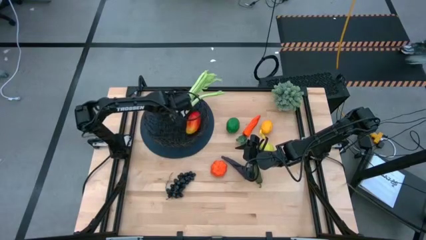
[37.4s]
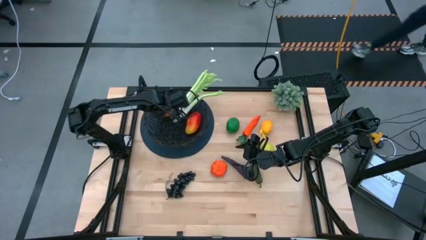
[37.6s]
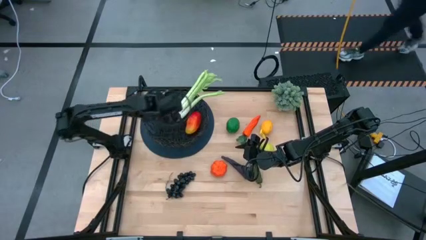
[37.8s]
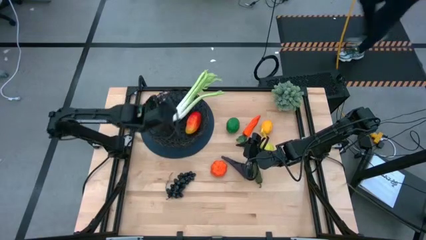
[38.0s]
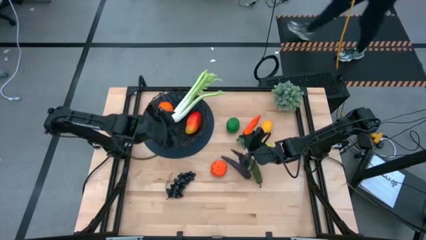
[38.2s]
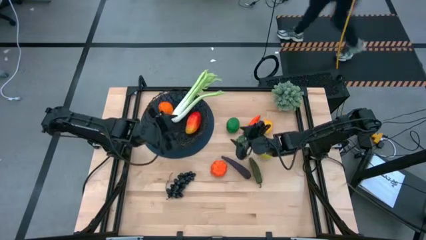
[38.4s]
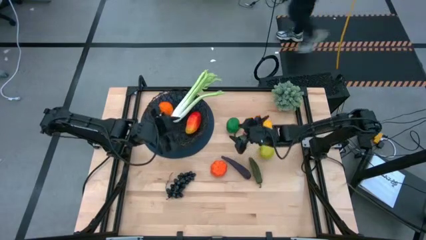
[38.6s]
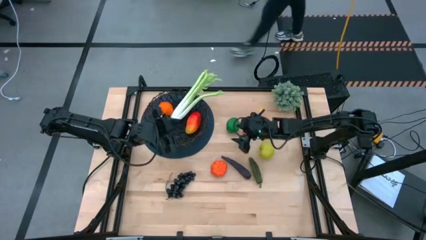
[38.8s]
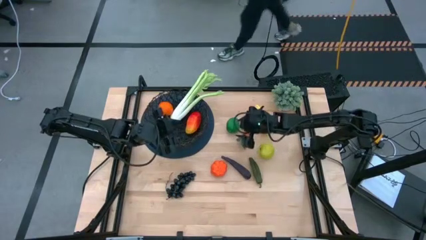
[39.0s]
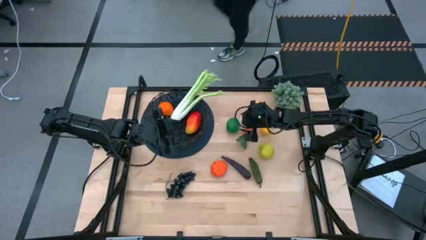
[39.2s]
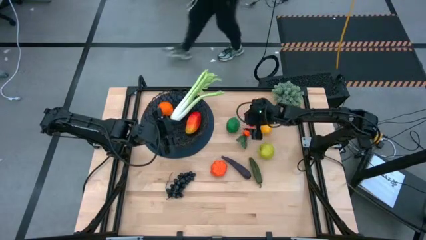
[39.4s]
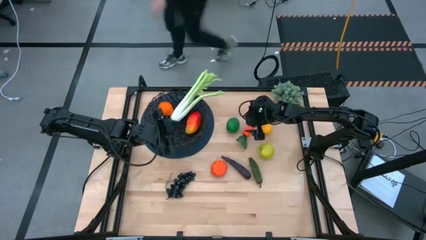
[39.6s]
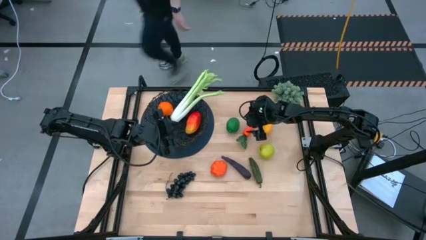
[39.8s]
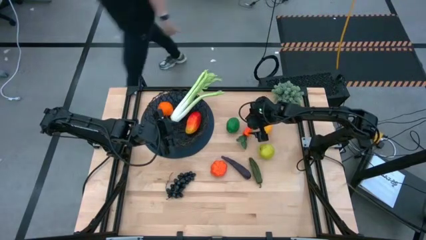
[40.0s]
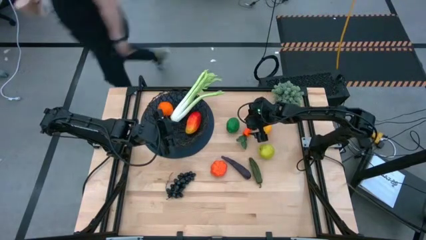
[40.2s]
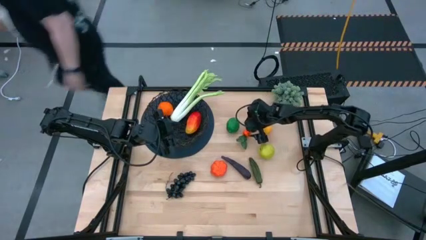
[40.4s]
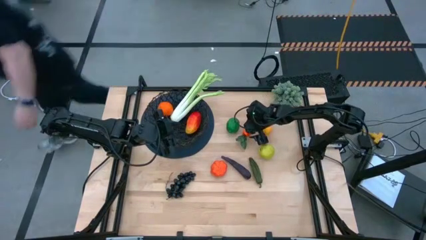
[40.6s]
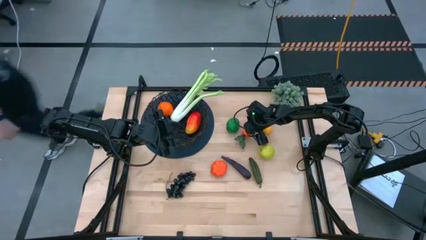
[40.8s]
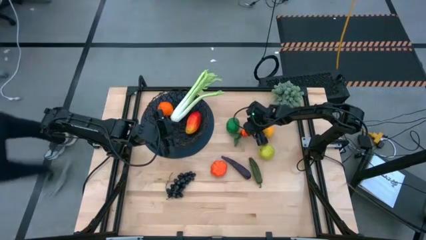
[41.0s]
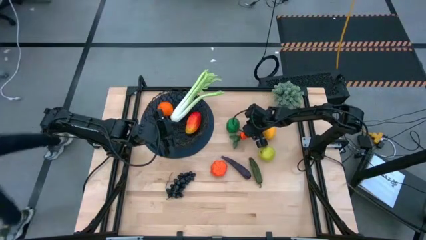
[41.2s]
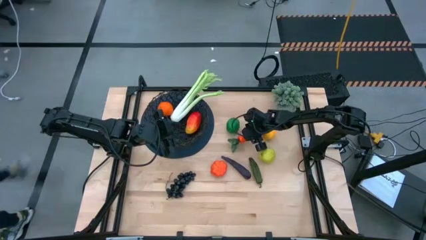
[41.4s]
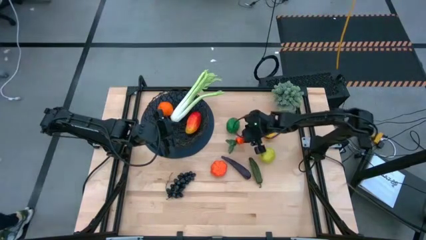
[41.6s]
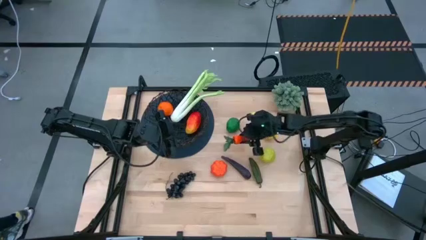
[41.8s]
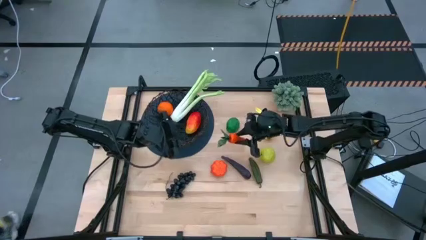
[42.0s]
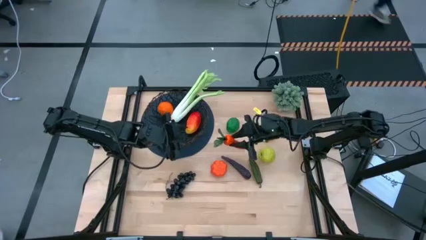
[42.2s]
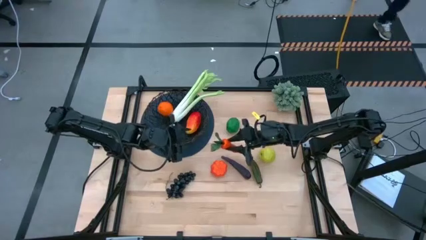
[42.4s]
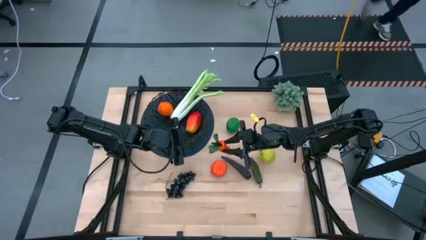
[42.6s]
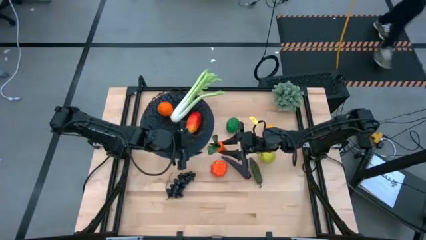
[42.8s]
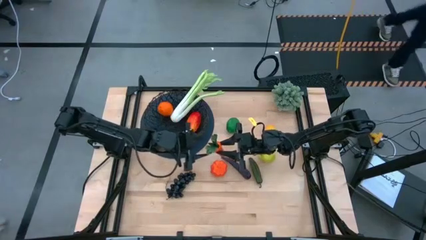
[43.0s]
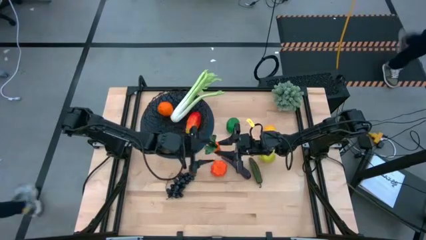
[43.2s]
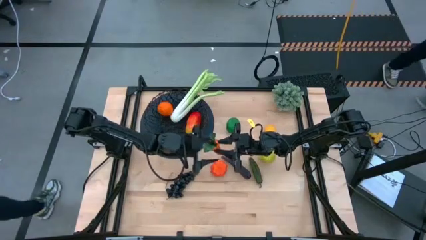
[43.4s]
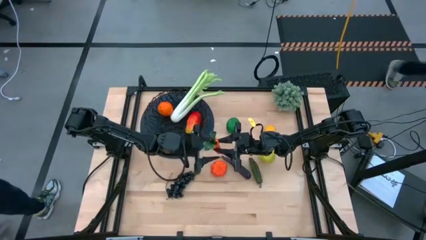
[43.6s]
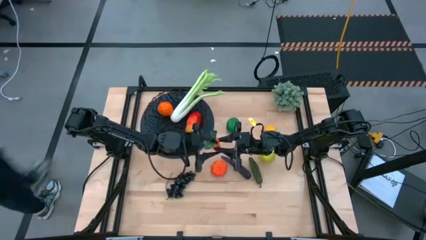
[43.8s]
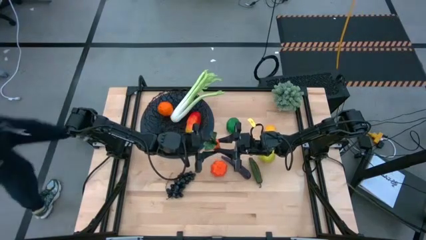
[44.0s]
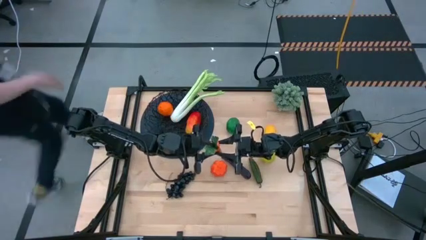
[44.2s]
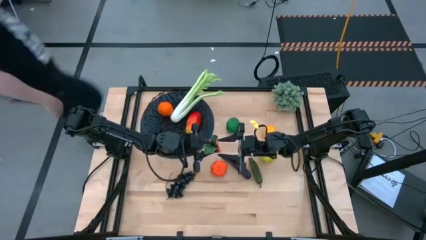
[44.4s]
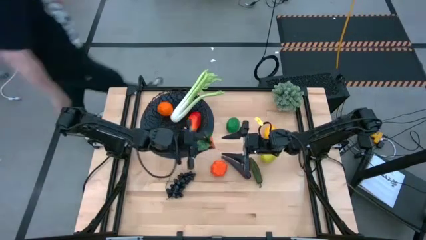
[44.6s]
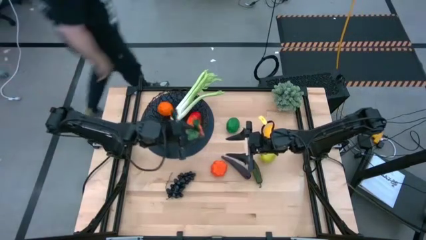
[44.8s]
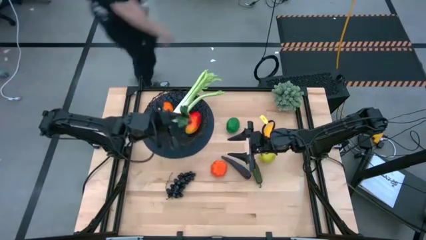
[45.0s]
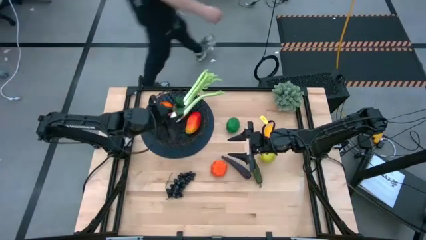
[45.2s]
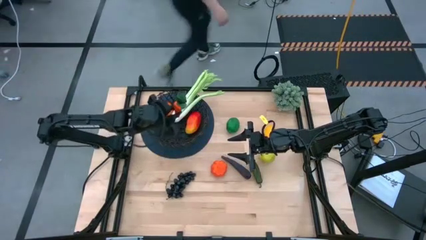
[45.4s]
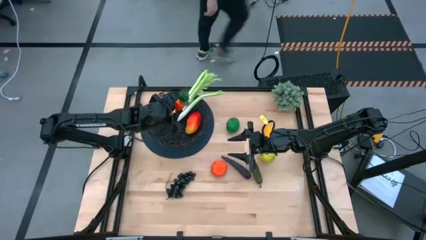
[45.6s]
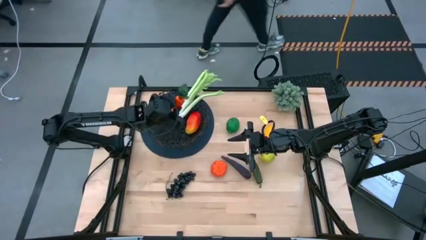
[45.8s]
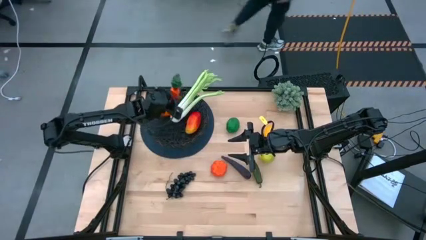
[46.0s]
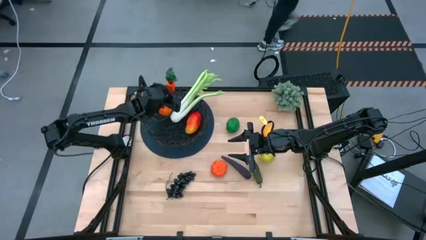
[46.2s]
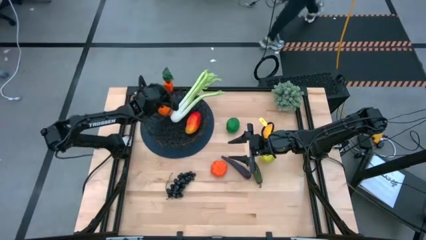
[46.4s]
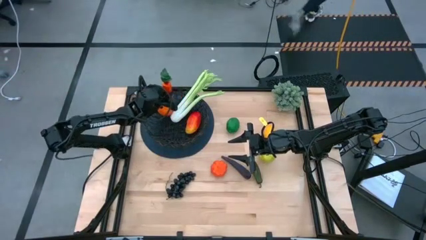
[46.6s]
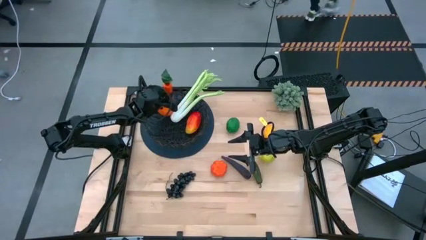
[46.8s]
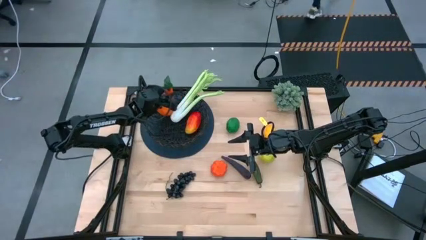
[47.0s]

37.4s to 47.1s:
Task: Build produce basket
Put the orange carrot into the black basket

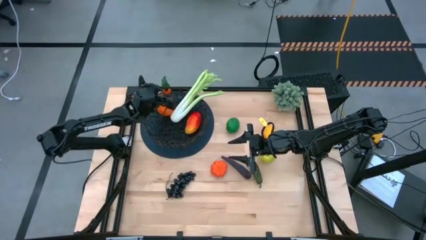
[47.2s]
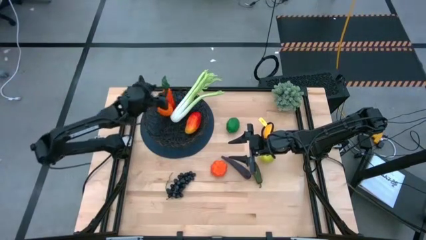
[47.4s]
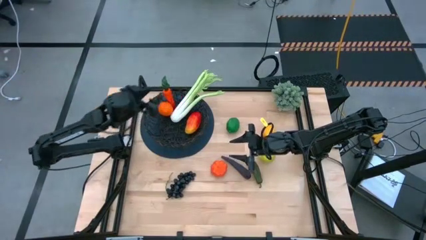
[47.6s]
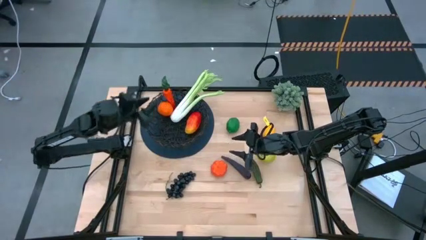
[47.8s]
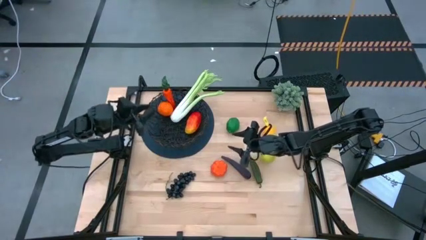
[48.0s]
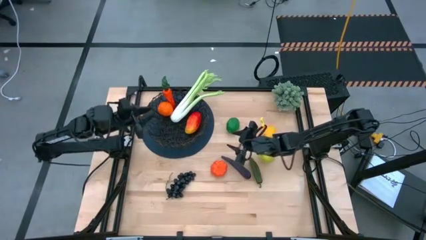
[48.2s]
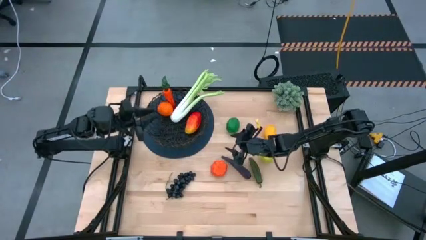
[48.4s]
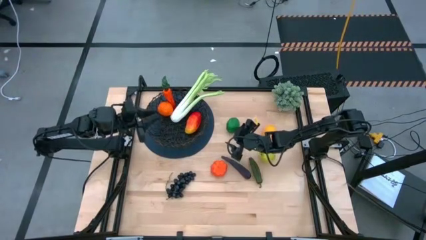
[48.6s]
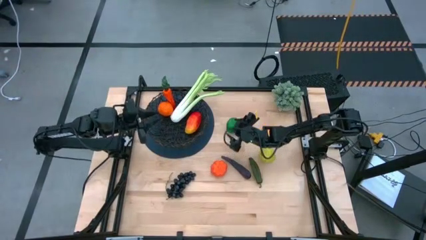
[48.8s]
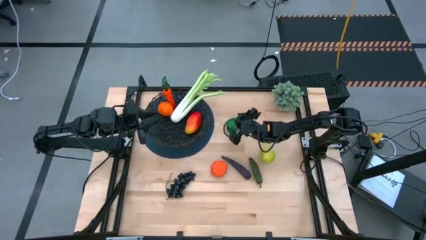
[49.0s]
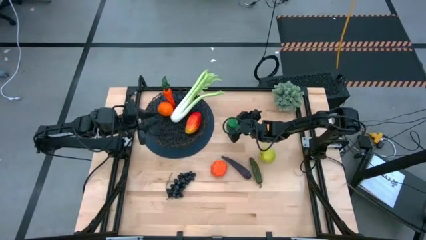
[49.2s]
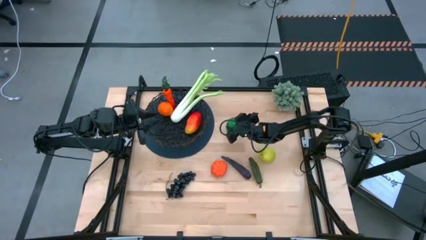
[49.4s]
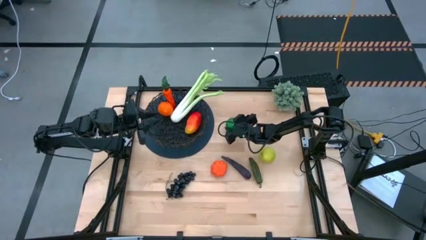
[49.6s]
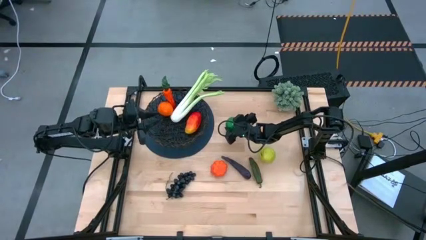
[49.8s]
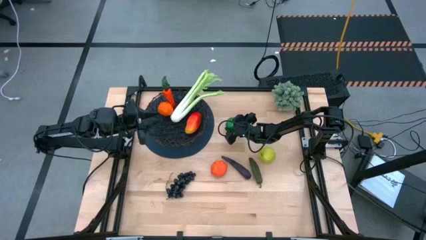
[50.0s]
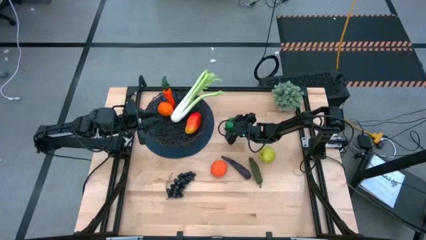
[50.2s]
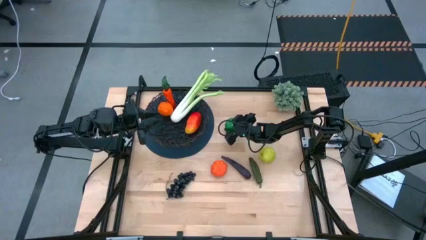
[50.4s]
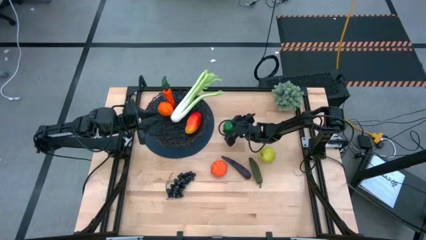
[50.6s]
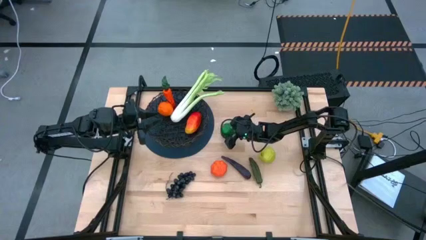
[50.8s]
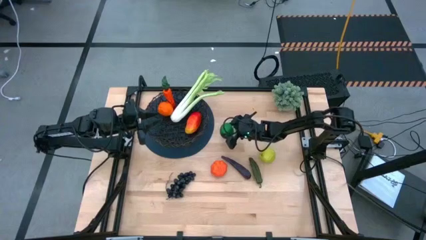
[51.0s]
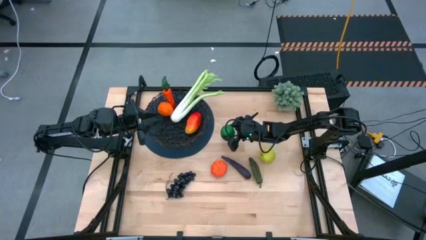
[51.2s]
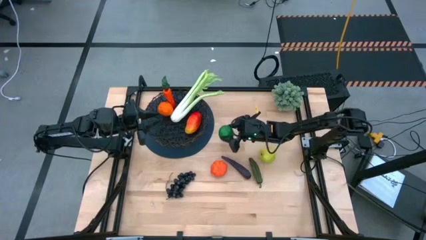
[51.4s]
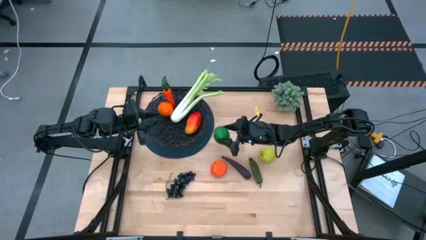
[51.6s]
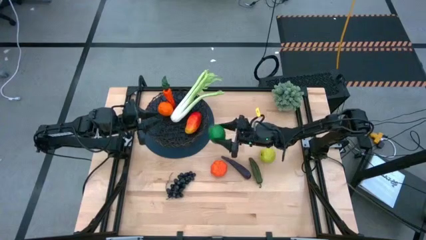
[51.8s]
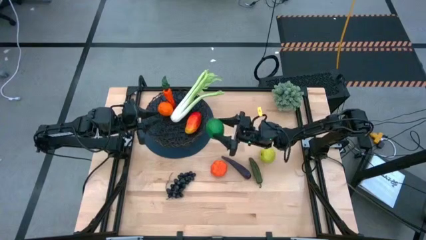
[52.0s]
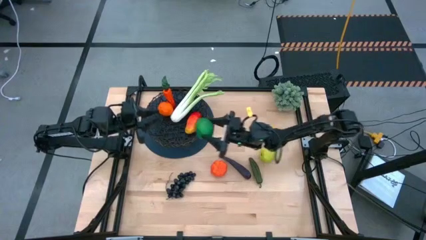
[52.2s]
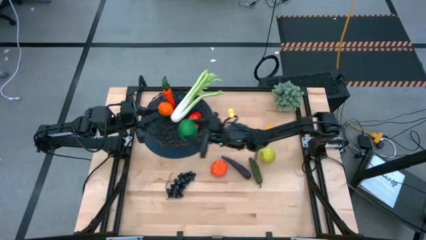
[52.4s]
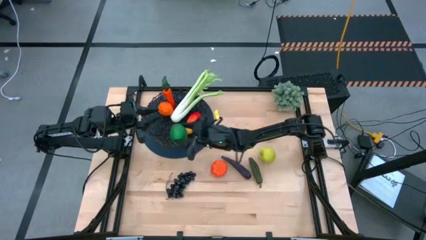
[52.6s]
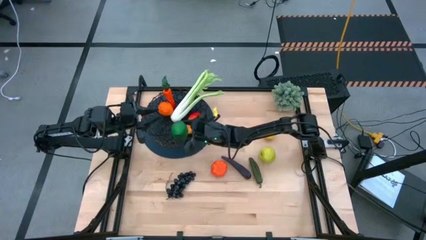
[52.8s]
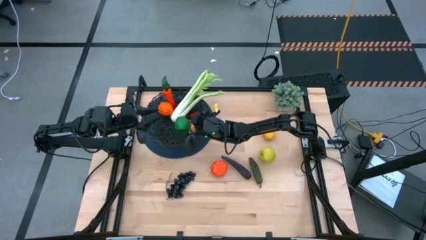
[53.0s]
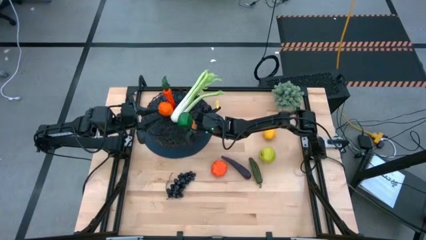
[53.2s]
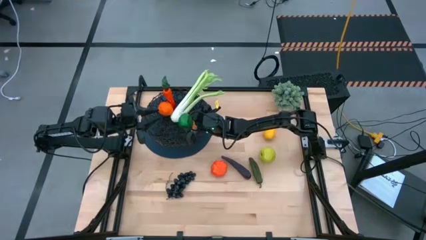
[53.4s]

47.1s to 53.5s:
Put the green lime into the black basket

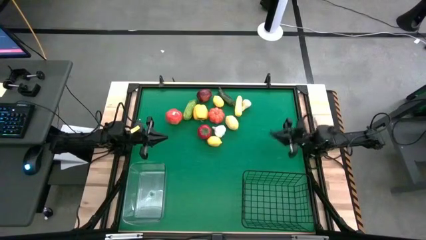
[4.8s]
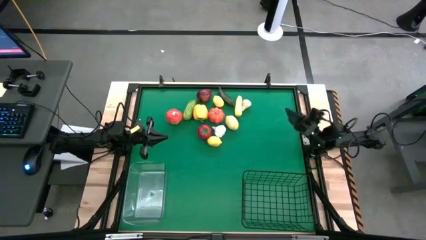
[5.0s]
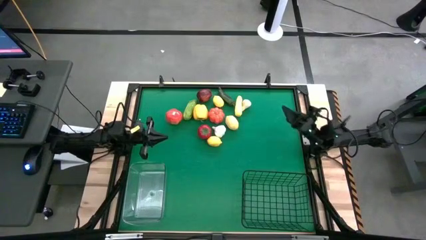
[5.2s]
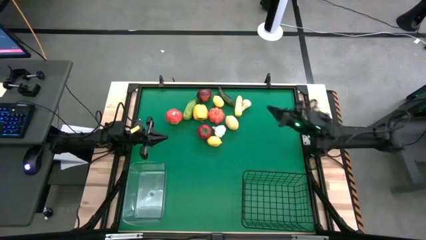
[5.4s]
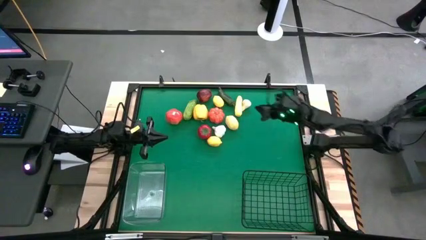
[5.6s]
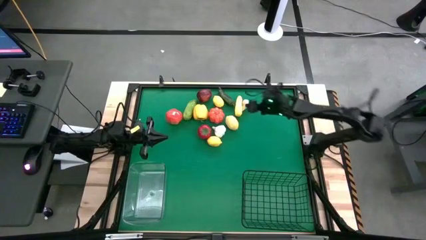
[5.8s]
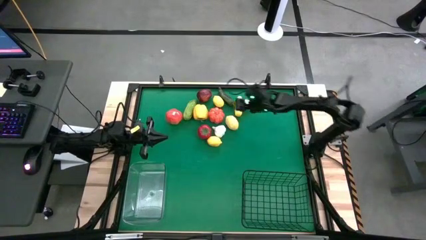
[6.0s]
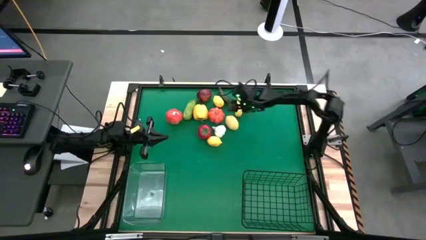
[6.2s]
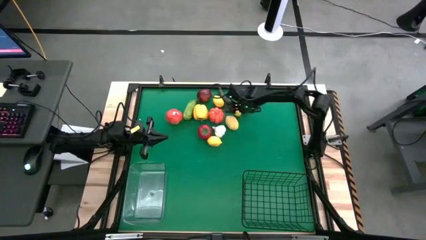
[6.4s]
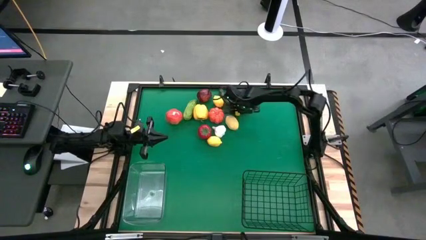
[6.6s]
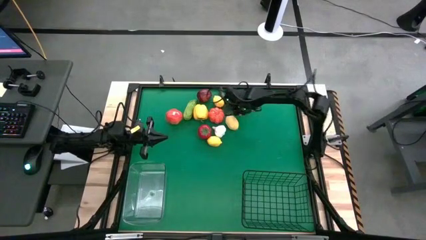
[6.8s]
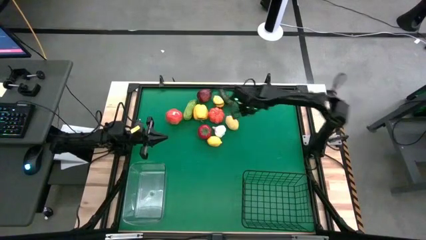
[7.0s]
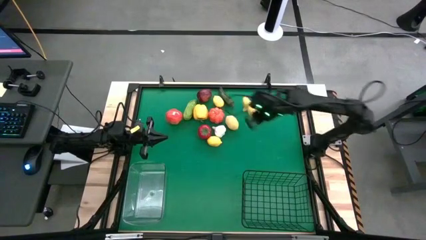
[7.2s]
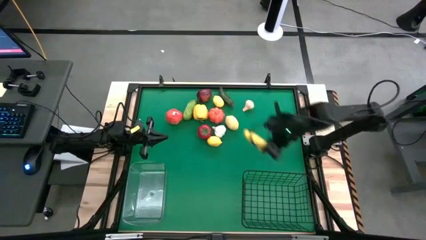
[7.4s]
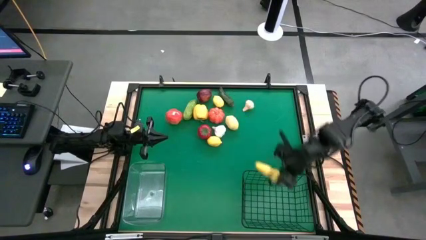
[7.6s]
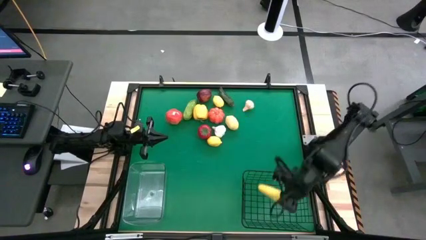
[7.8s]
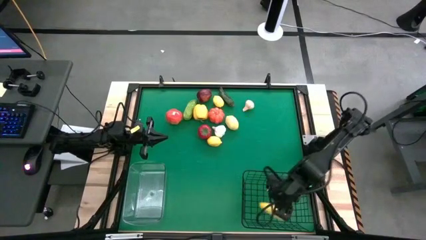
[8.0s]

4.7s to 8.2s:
Task: Sort produce into baskets
Put the corn into the wire basket
